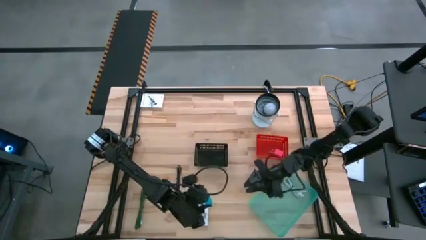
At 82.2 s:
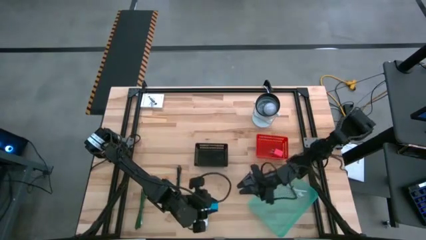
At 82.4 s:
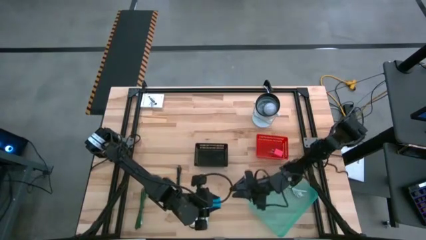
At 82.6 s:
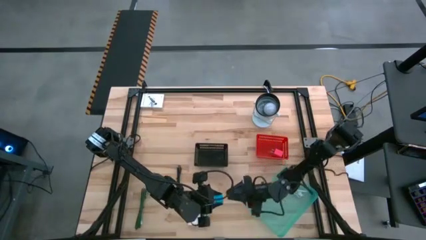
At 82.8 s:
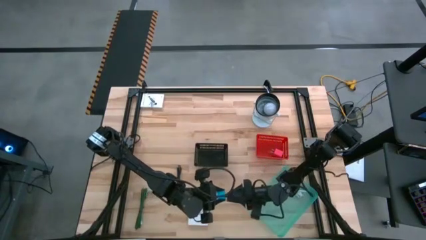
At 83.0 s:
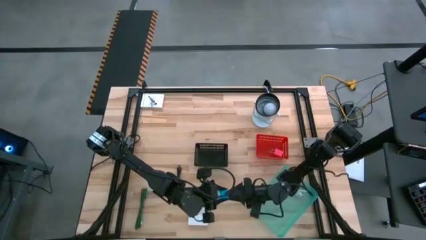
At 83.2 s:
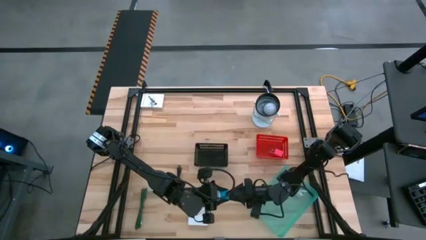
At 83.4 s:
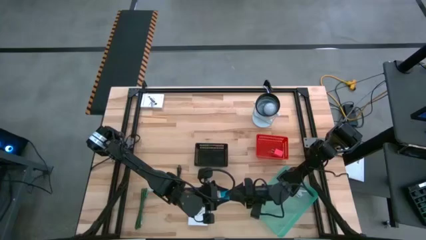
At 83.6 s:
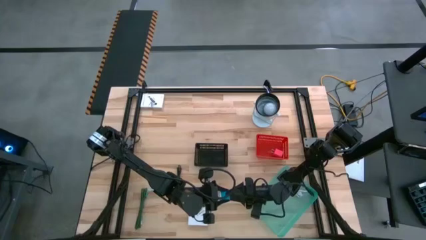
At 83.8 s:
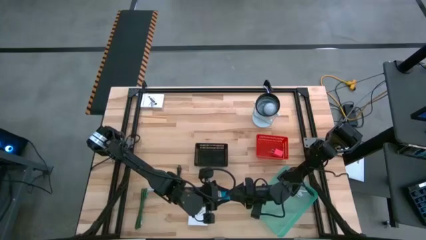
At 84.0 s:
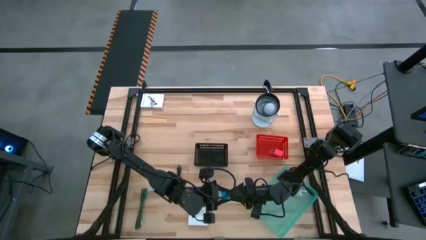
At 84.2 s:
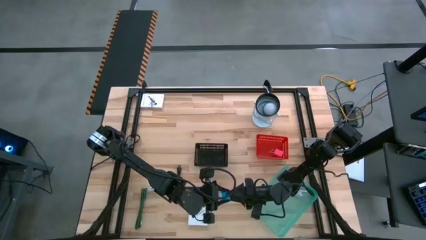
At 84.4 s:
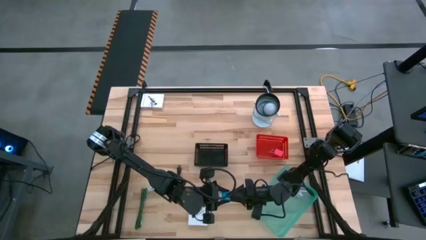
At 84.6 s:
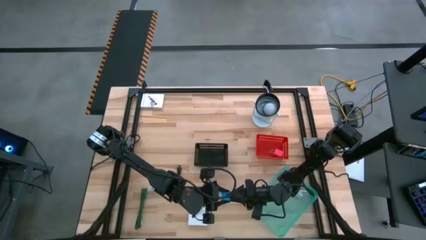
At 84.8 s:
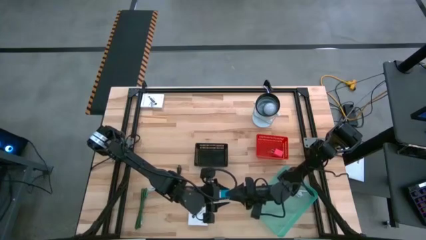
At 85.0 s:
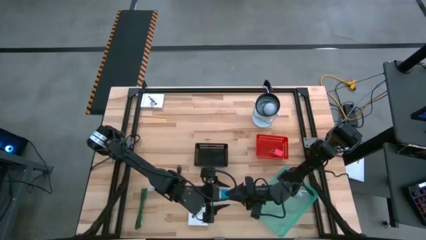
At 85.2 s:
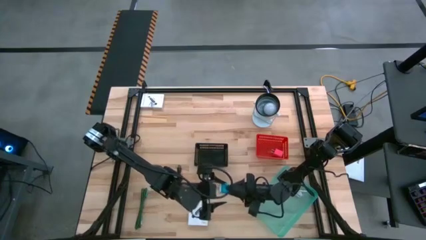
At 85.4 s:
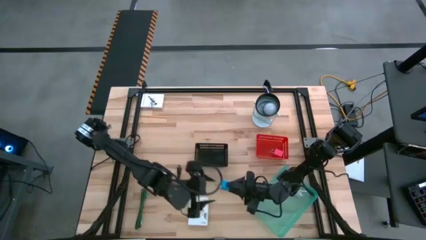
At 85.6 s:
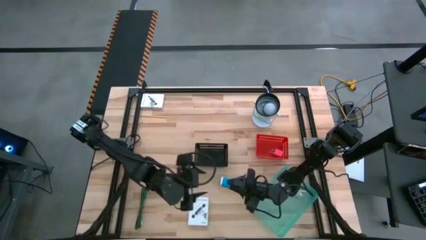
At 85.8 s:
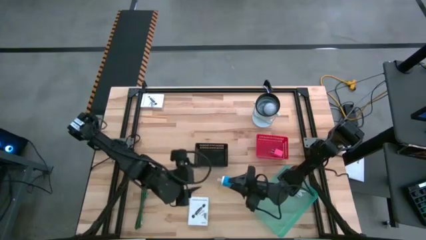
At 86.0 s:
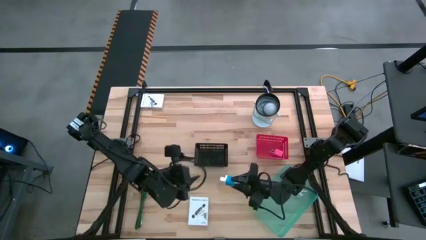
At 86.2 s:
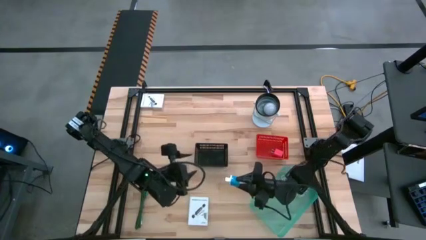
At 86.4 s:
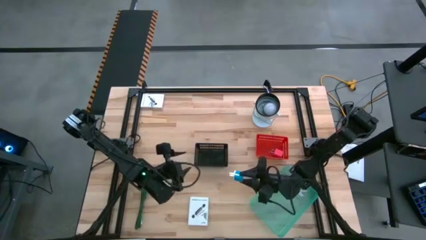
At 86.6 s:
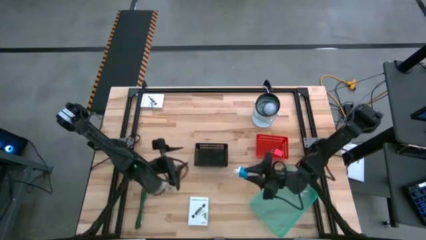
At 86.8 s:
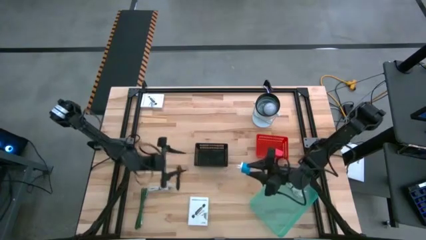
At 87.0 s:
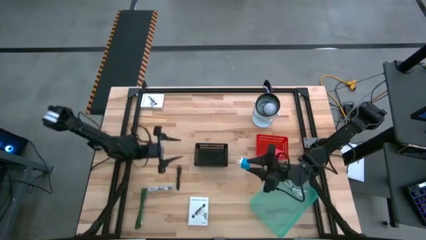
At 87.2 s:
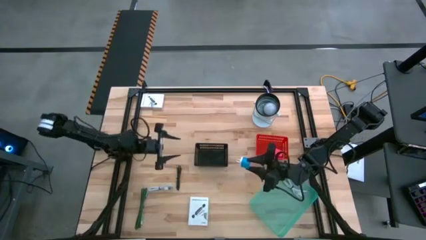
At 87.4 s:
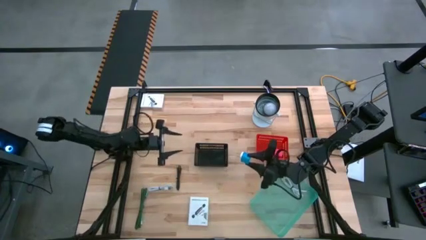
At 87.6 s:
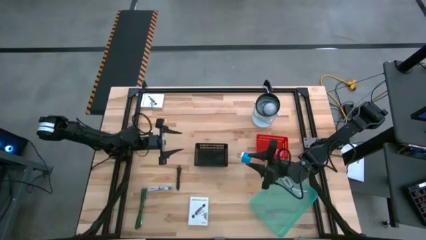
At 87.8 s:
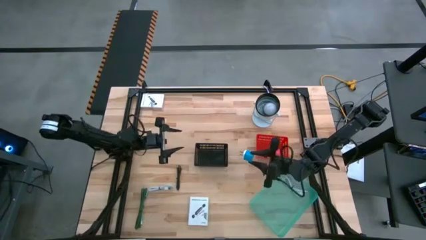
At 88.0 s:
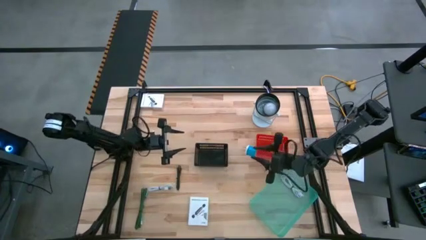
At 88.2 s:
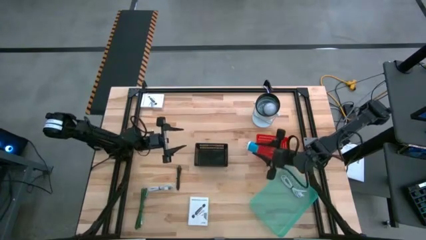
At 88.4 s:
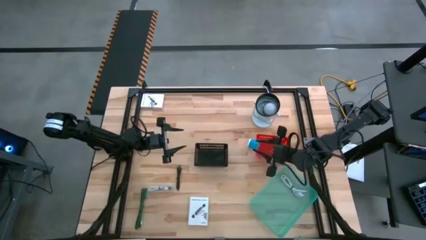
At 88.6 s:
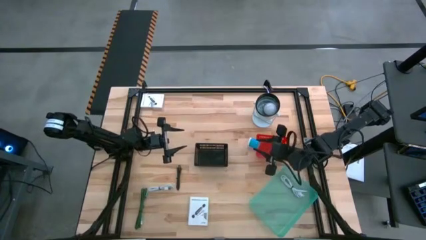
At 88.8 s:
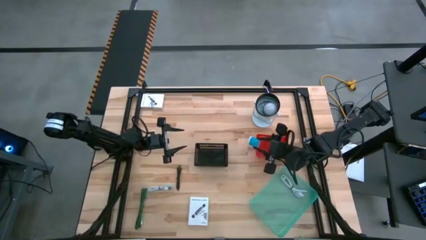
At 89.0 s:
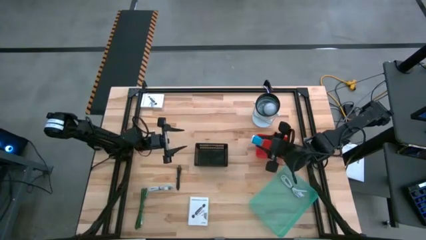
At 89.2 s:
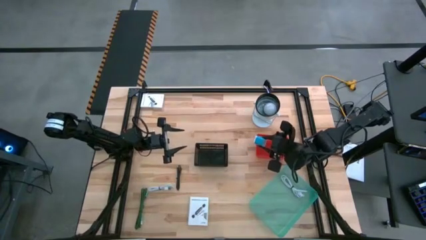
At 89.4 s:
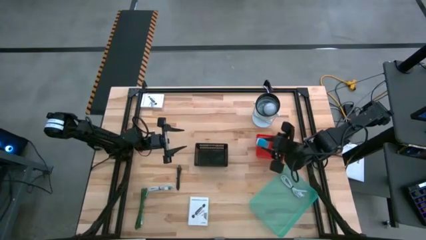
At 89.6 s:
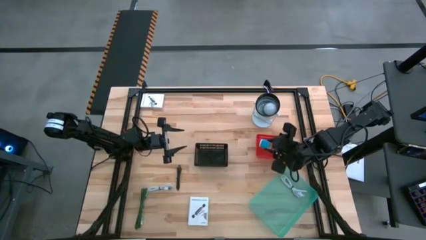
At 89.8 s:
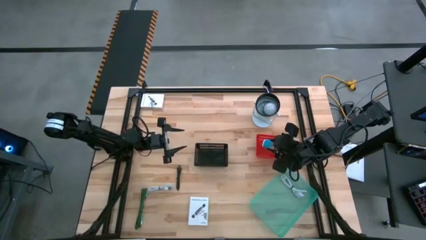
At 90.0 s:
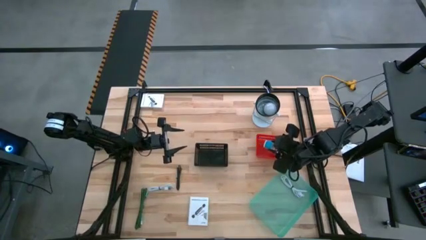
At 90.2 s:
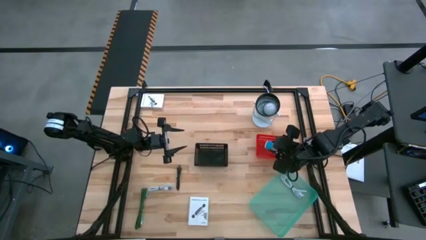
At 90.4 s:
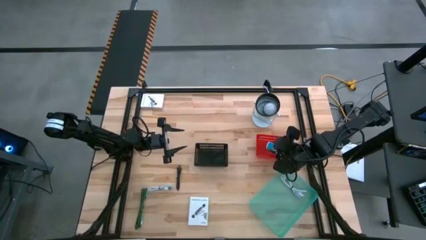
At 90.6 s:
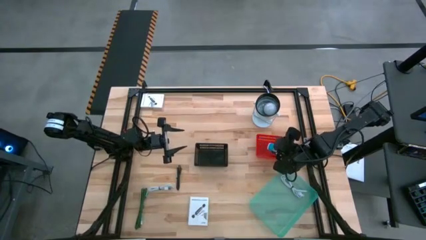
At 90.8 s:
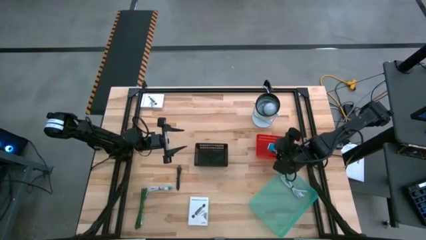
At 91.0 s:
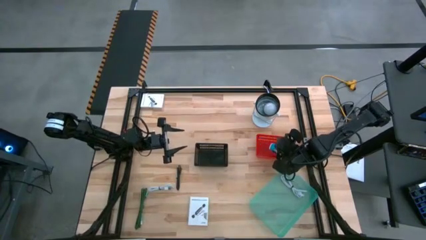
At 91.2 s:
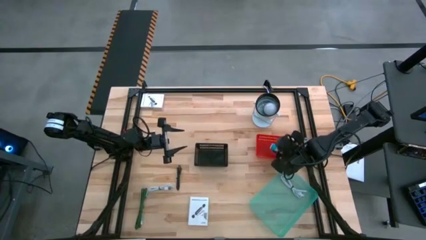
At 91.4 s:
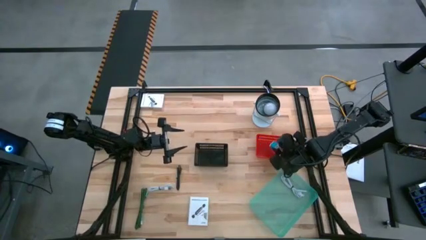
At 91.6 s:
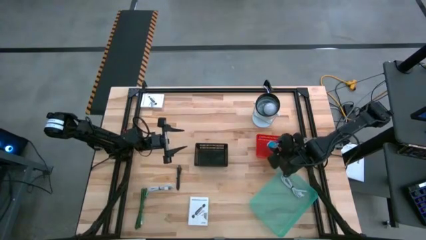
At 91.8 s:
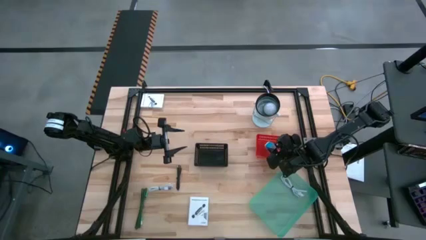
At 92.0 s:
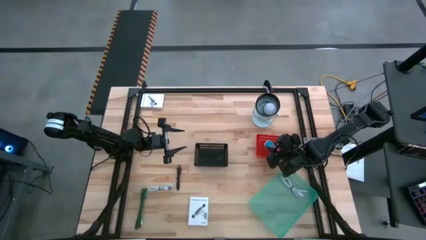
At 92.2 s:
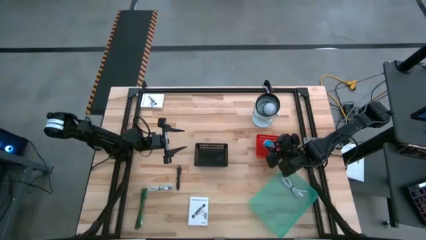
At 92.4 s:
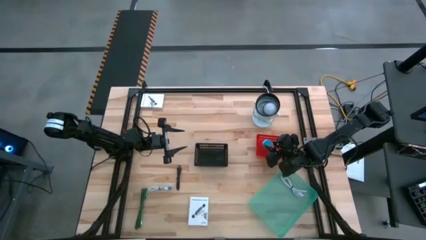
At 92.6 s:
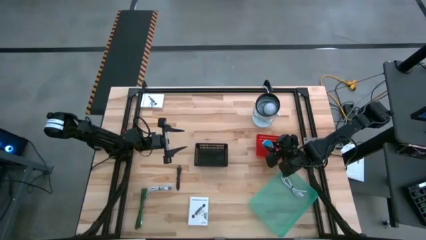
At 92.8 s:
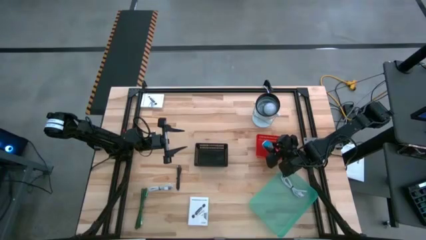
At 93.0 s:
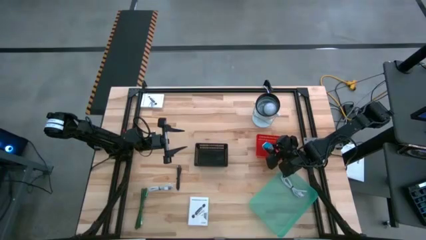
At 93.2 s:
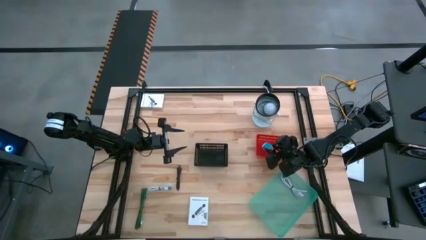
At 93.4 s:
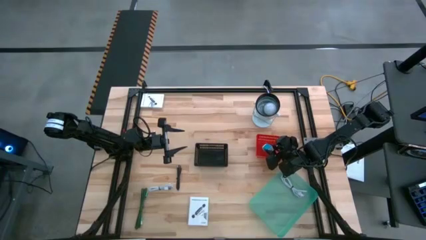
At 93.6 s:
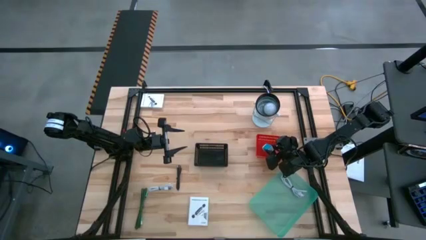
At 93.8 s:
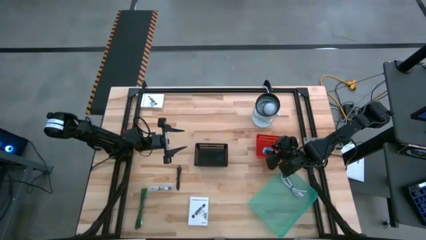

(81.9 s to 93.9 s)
Task: Pick and place items into bin
Put the blue charger adapter into the red bin

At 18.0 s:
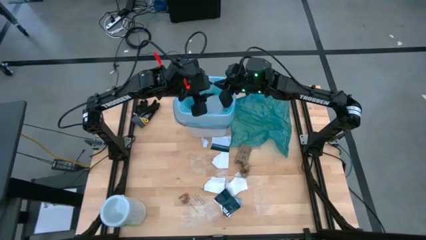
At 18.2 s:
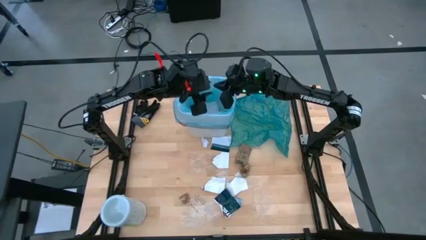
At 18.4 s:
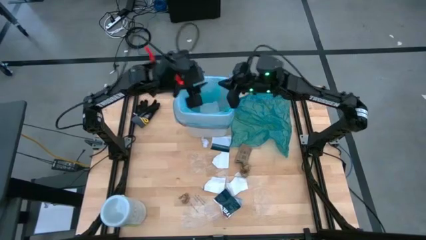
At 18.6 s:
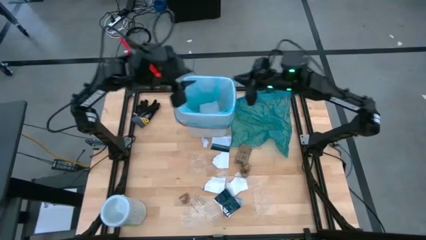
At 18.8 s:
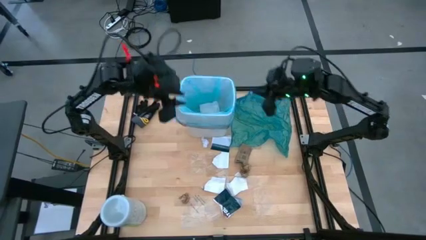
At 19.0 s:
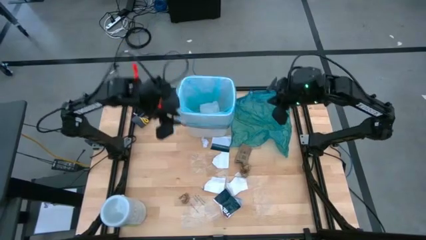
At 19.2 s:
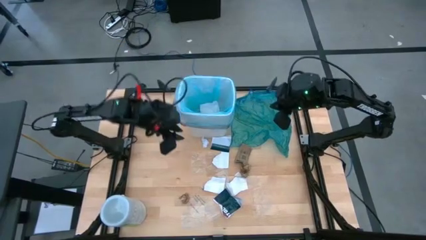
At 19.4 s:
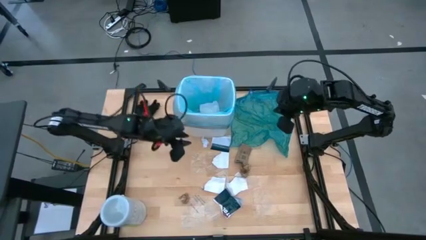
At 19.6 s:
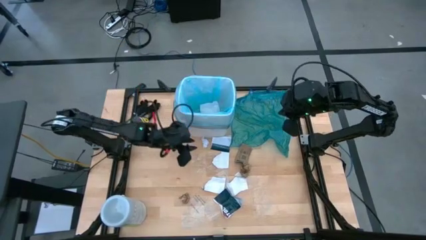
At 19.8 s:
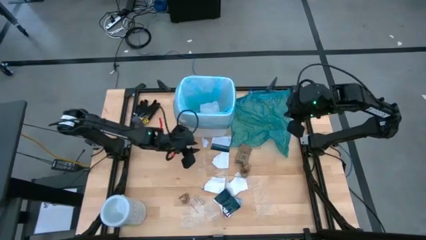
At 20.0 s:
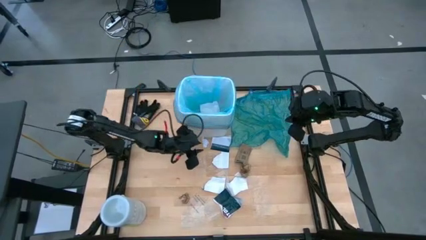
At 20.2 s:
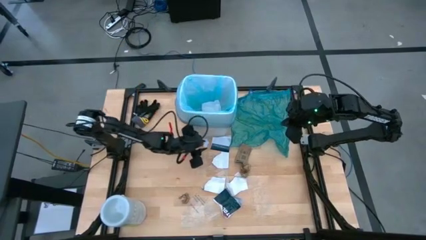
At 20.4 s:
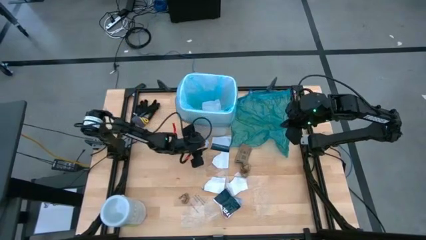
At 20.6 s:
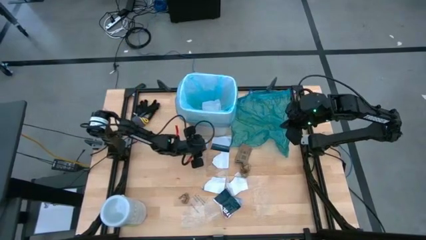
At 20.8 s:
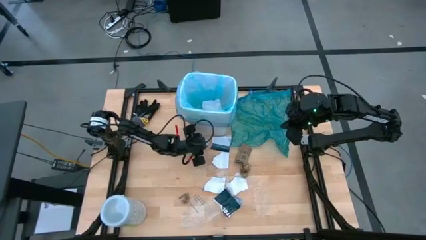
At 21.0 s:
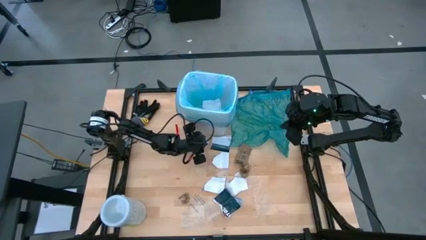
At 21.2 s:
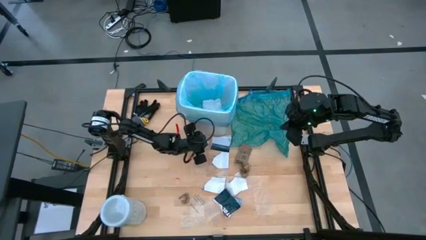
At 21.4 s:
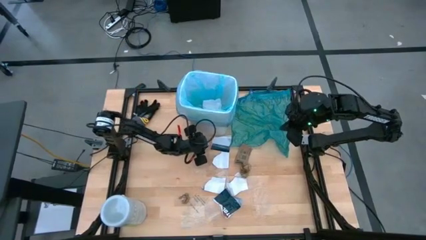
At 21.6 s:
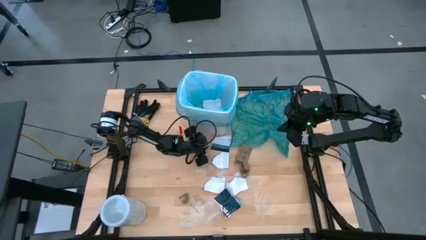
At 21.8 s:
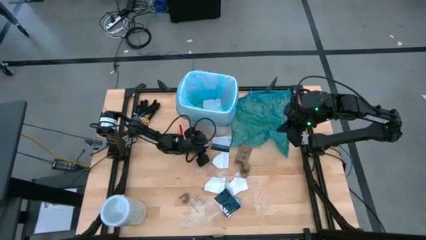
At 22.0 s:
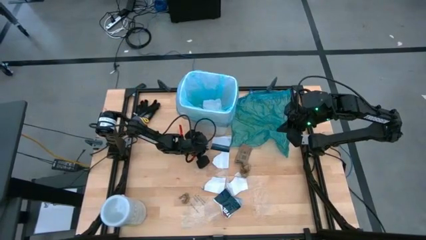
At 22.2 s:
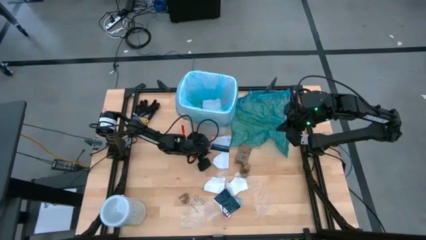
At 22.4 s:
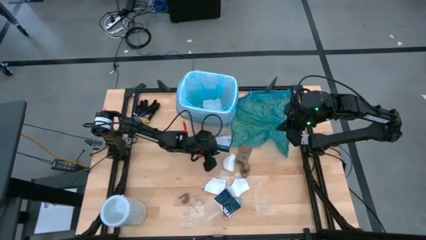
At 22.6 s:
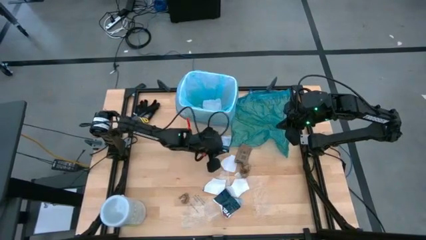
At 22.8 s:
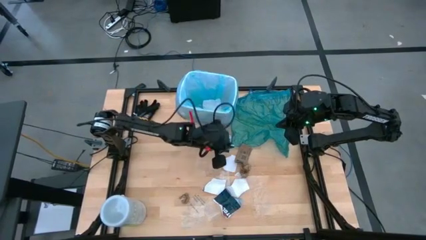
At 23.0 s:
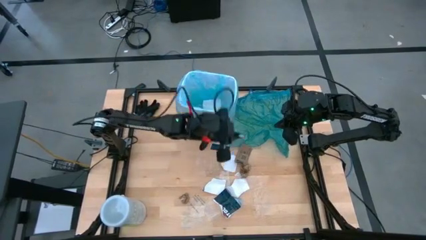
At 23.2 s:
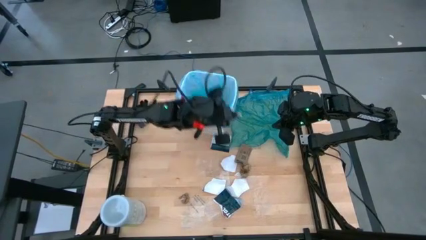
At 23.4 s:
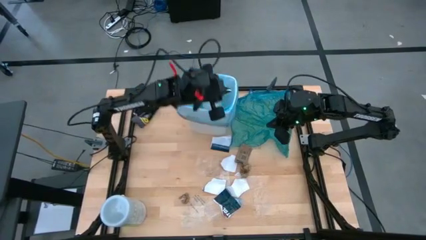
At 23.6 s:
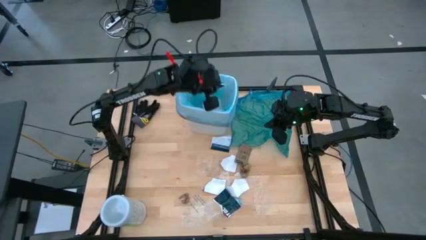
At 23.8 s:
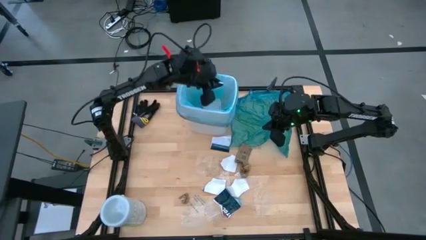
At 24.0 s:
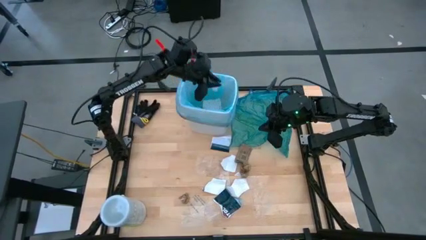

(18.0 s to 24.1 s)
Task: place trash/remove bag and relplace
Put the white paper into the trash bin
